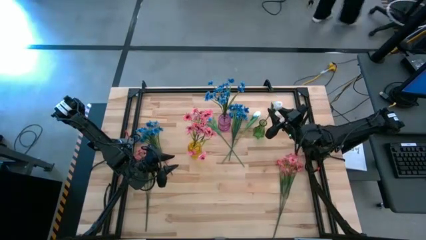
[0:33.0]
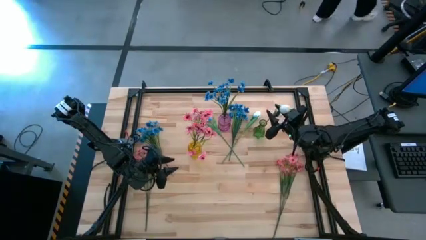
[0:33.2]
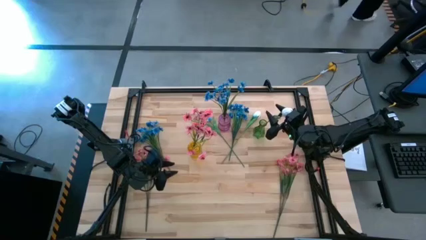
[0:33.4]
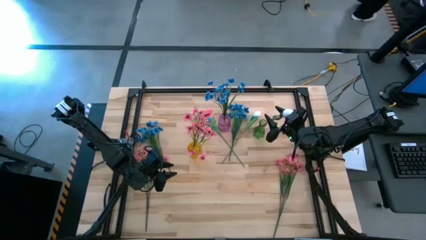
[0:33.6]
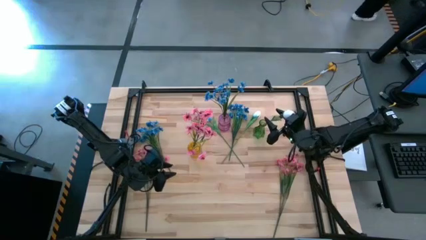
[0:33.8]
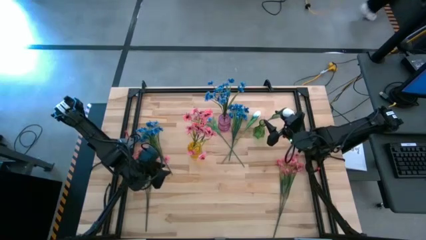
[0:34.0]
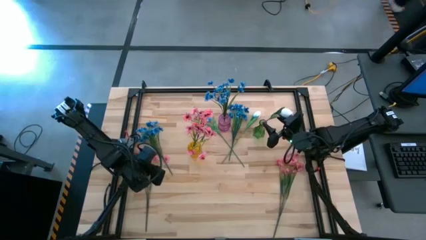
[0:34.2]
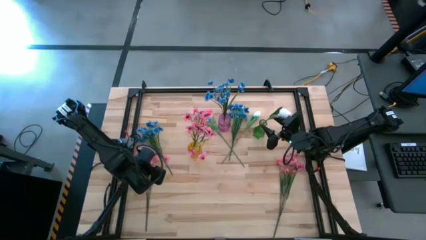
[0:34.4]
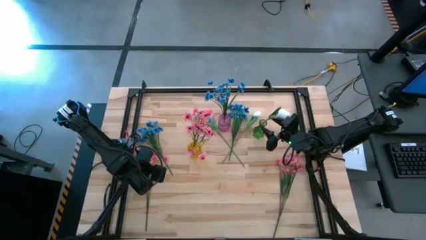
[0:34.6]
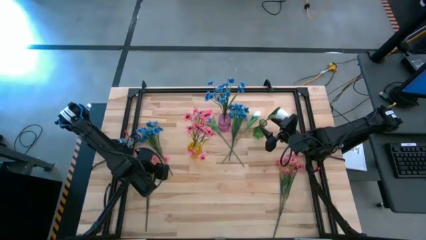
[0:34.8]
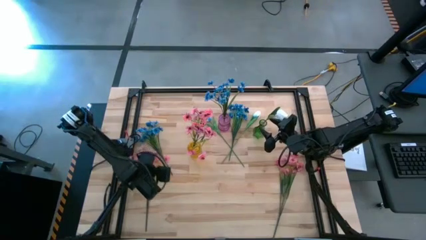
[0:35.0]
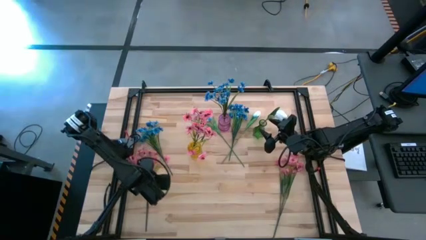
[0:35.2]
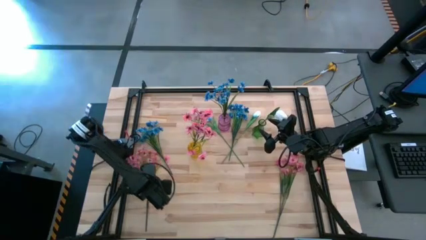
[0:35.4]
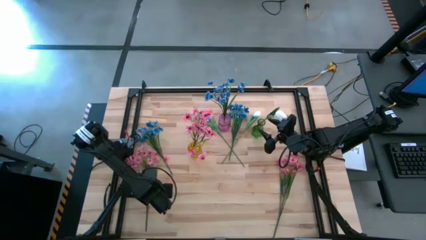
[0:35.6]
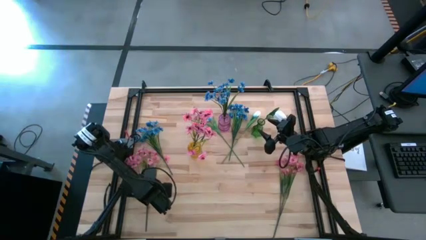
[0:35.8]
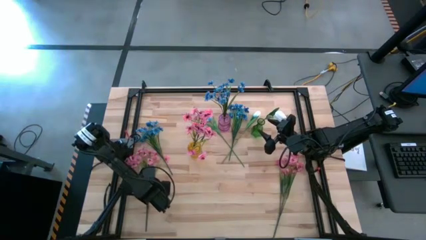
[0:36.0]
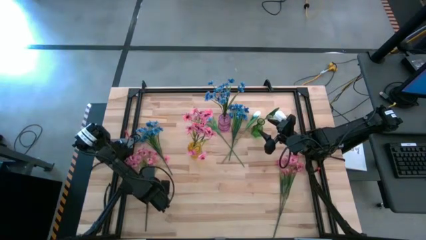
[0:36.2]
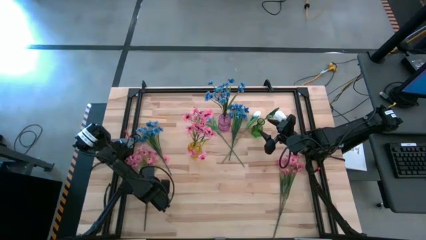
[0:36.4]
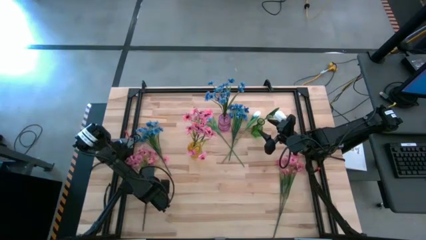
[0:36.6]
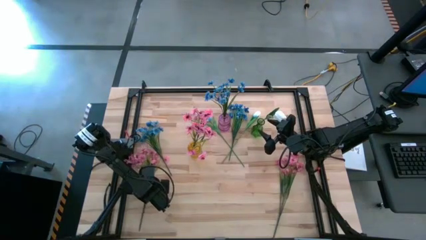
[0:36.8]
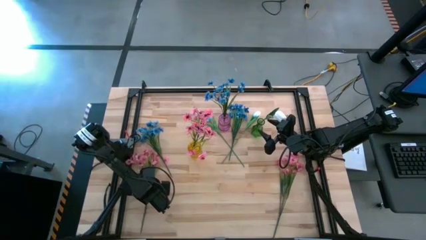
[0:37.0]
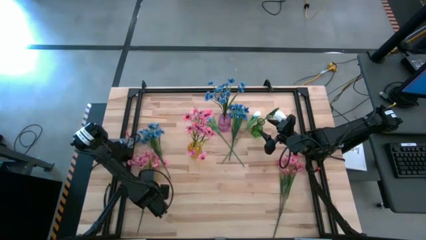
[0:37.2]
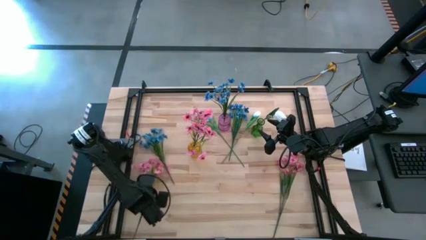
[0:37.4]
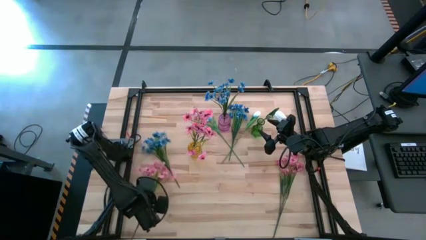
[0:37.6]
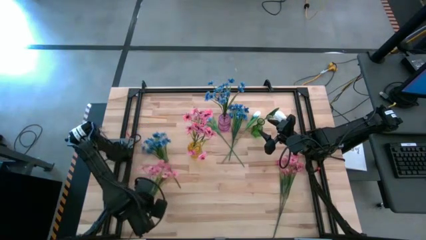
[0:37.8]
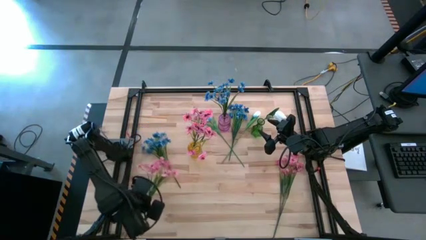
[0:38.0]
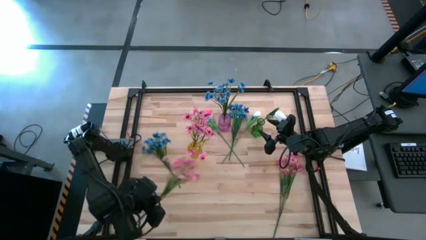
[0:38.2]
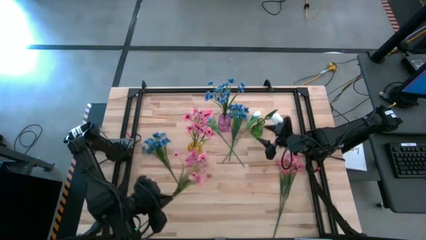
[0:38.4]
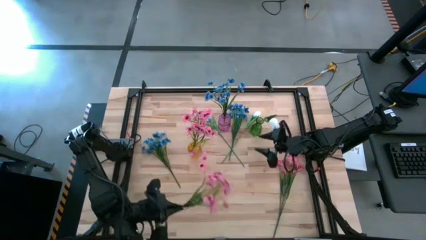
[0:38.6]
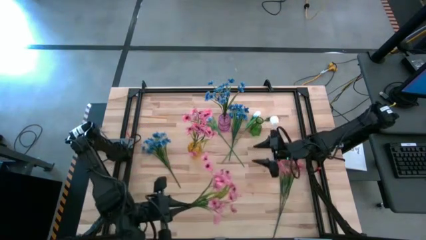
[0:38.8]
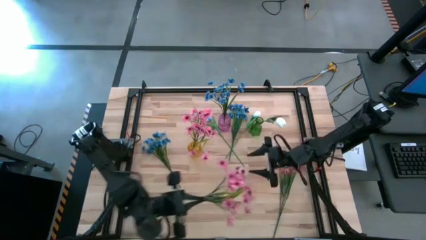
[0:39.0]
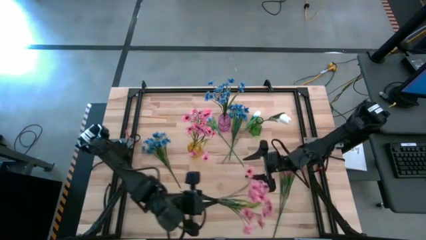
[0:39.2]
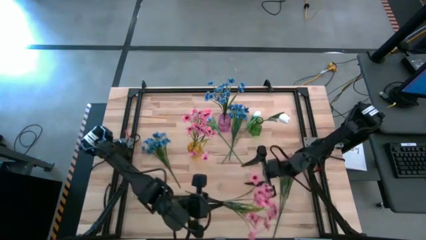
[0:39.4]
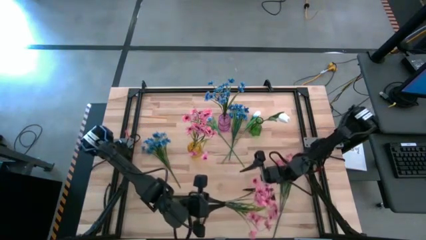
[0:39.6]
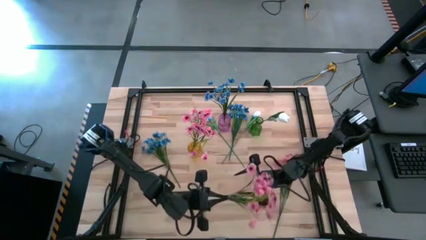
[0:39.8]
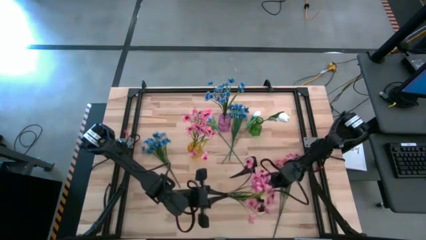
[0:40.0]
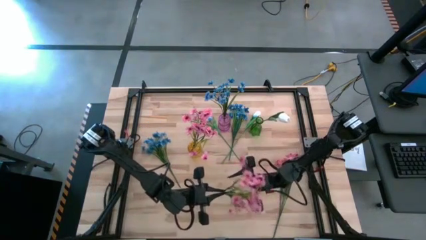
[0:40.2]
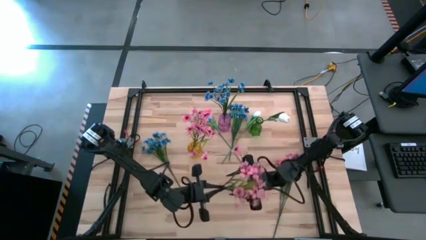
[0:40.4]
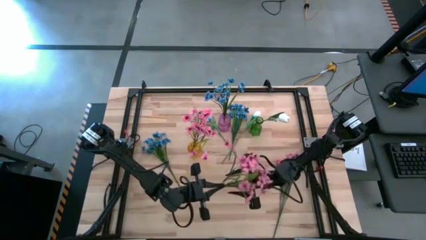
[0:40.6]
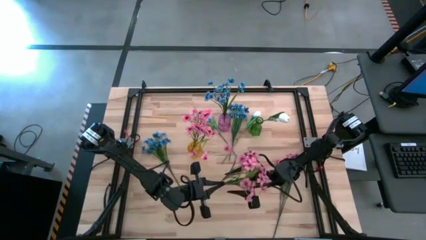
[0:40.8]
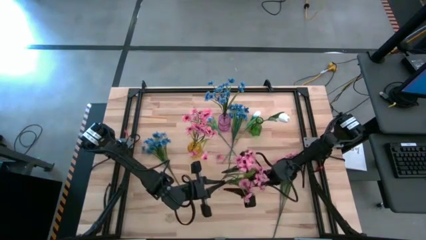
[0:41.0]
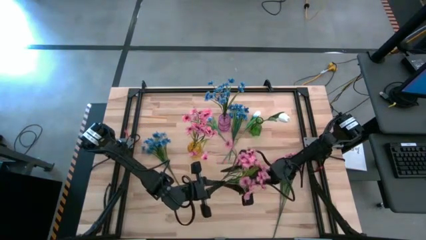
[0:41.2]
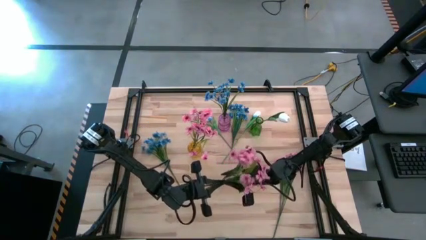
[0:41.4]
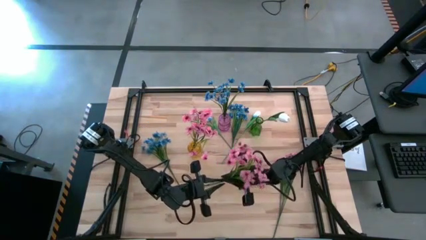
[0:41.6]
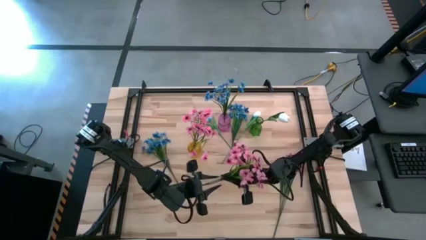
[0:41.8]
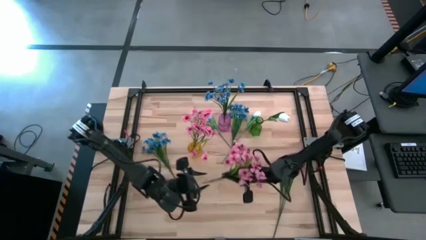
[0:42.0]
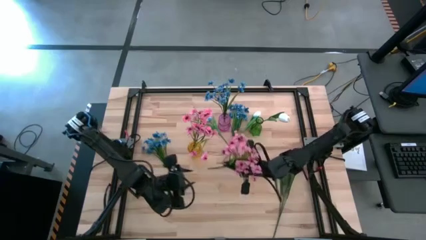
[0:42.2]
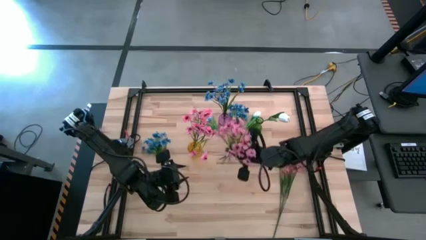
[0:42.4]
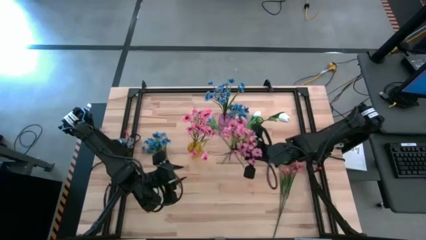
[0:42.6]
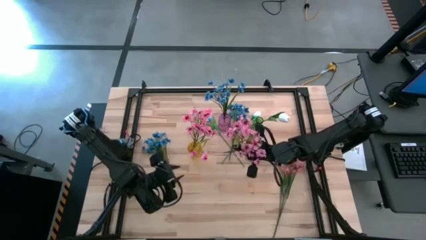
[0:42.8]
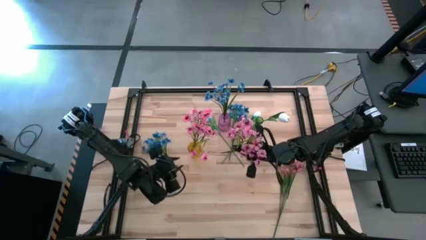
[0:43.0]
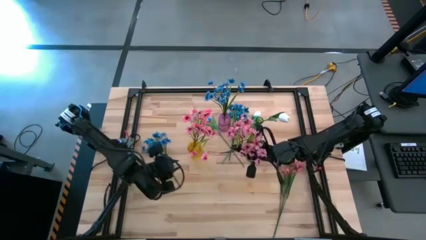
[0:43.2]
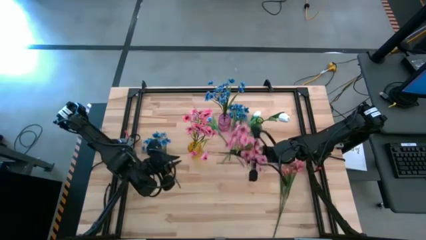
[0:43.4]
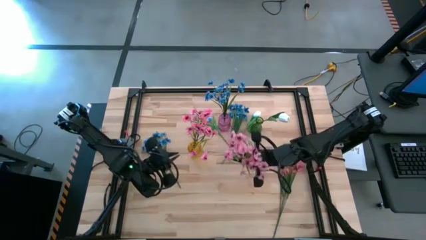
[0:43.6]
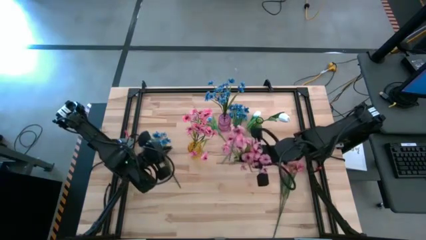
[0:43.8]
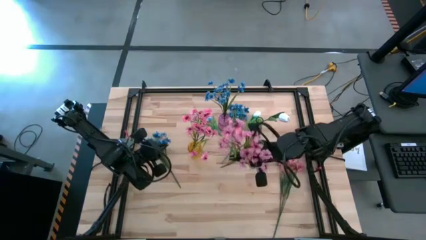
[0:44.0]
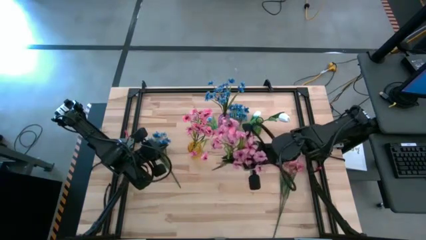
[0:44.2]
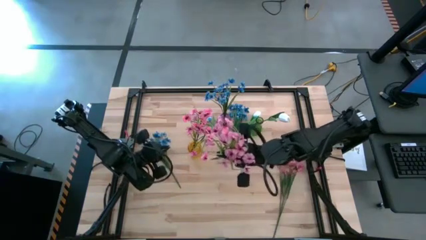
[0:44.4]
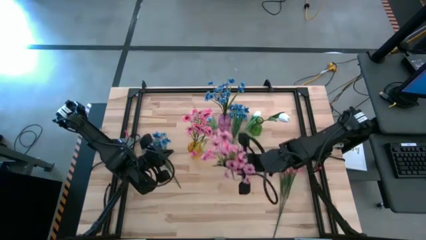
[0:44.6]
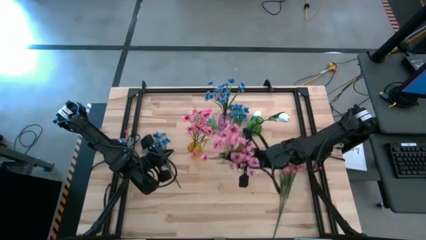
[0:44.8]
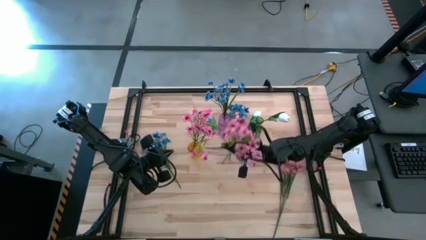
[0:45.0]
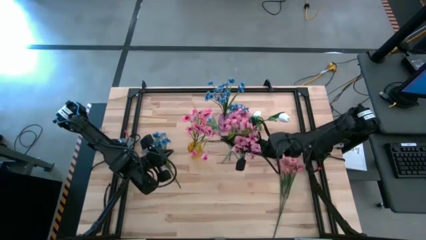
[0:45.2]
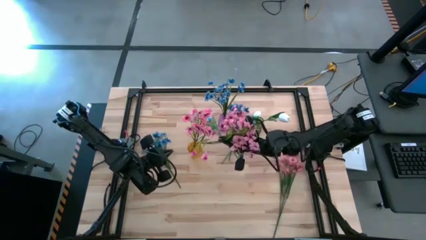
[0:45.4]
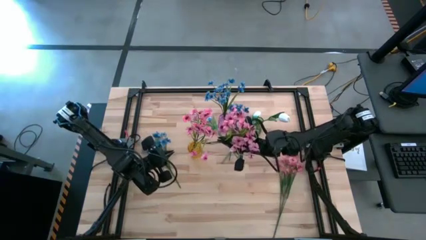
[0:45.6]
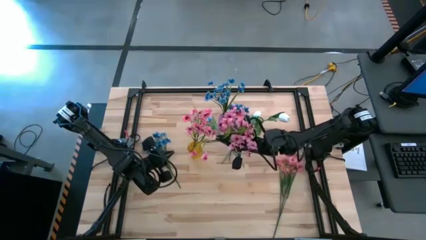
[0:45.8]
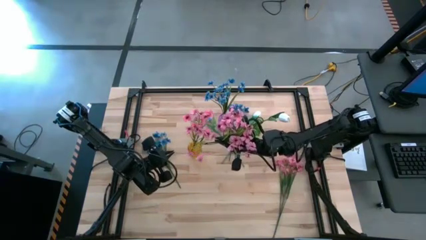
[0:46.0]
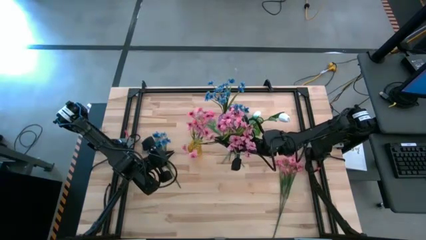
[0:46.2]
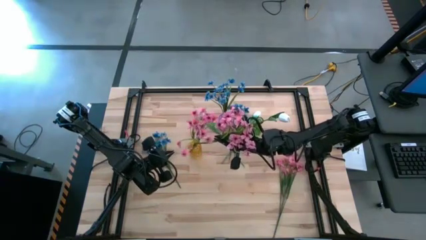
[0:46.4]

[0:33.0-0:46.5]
Task: Sort flowers into vase by color
Put the bottom left pink flower into the yellow flower vase
